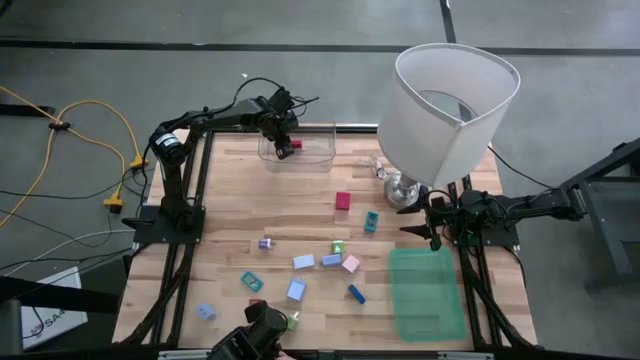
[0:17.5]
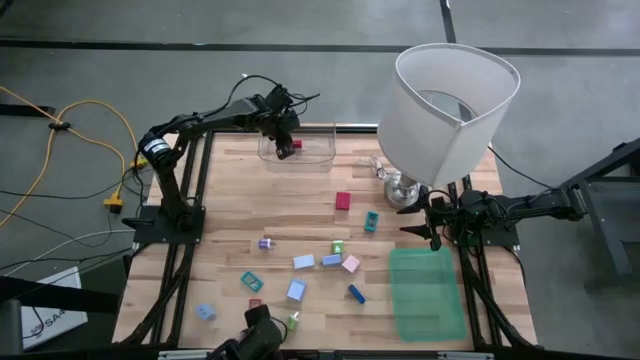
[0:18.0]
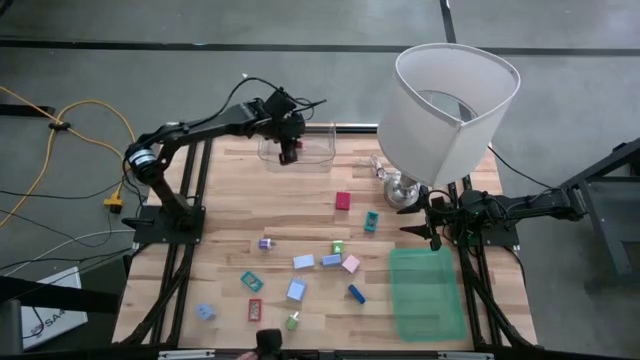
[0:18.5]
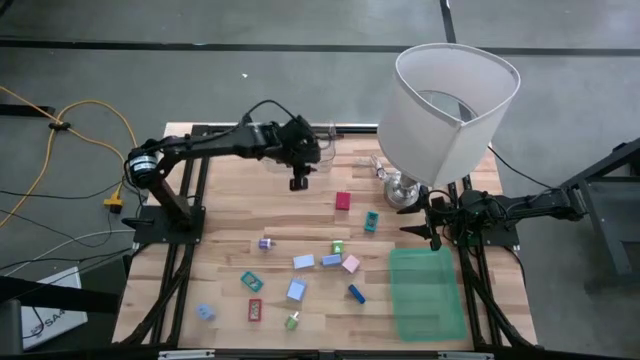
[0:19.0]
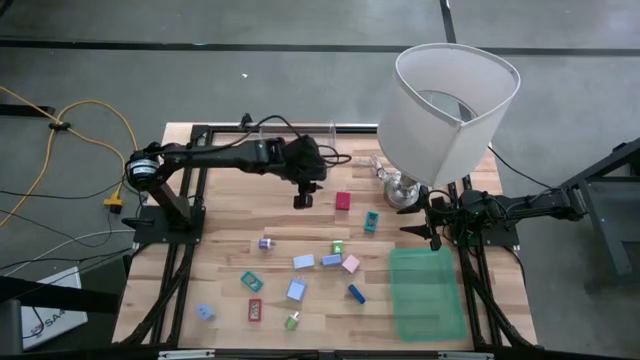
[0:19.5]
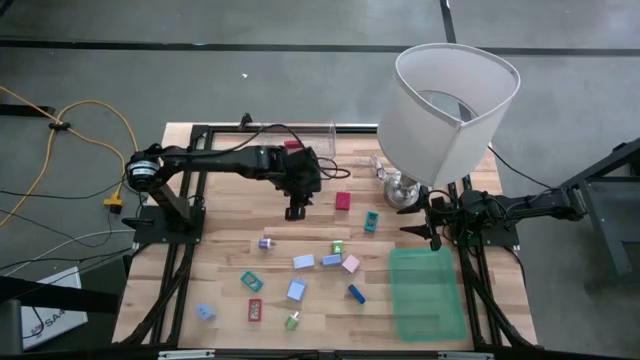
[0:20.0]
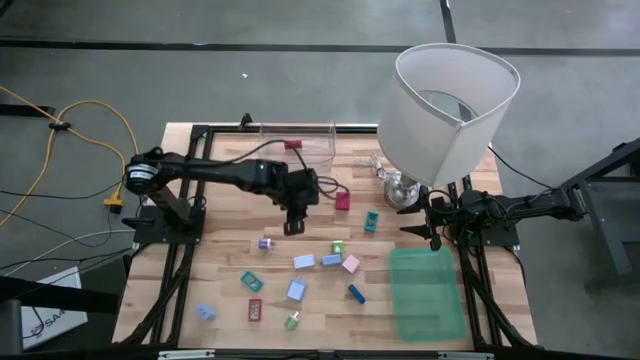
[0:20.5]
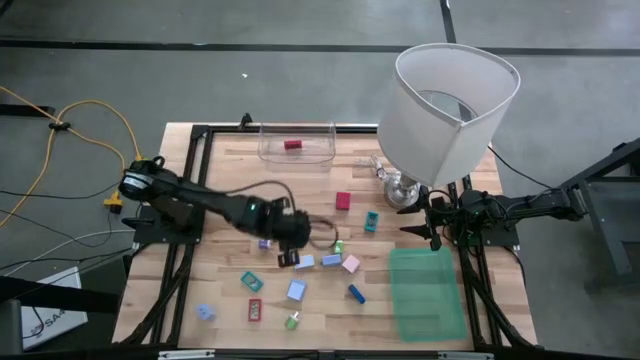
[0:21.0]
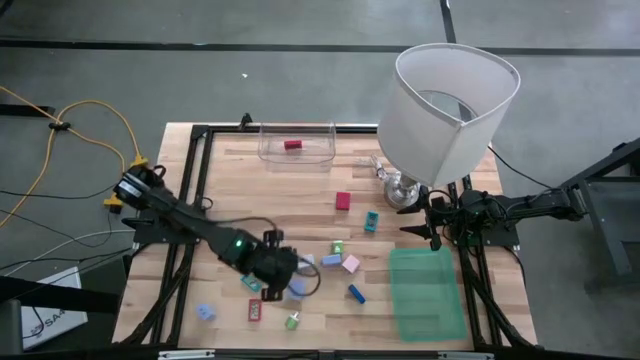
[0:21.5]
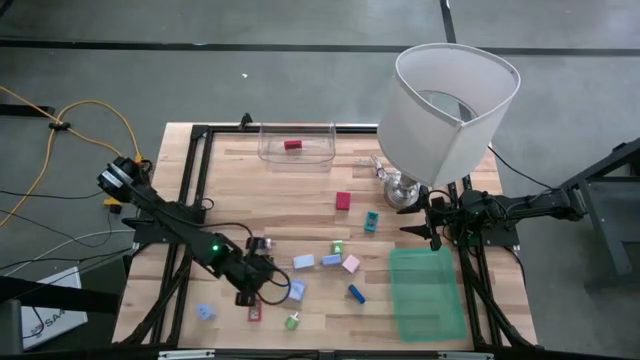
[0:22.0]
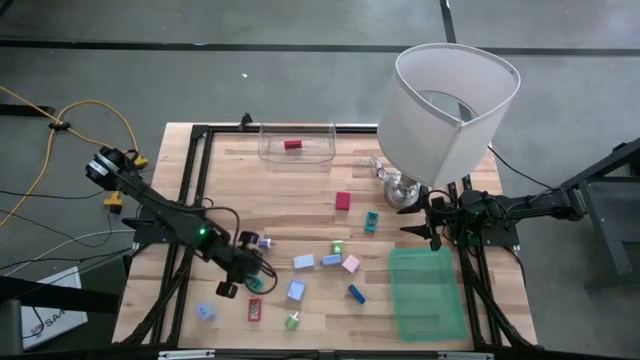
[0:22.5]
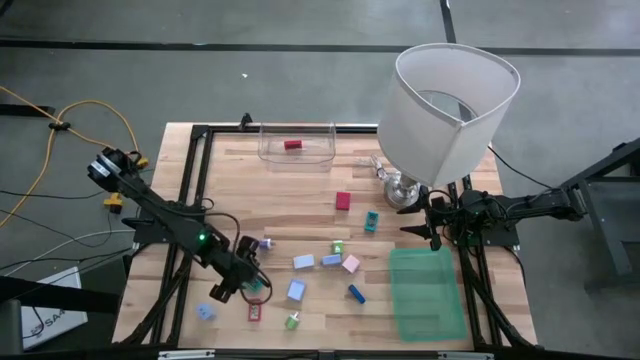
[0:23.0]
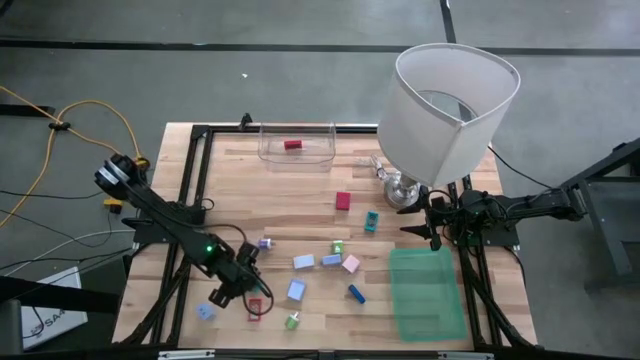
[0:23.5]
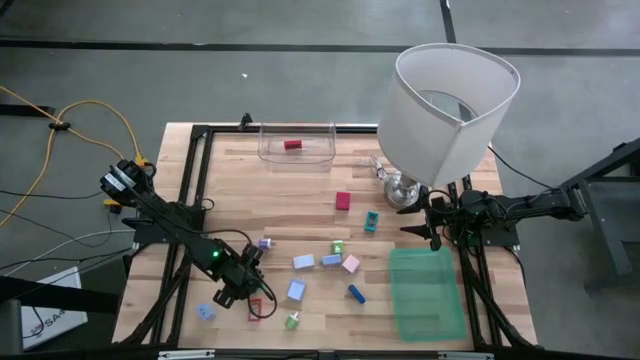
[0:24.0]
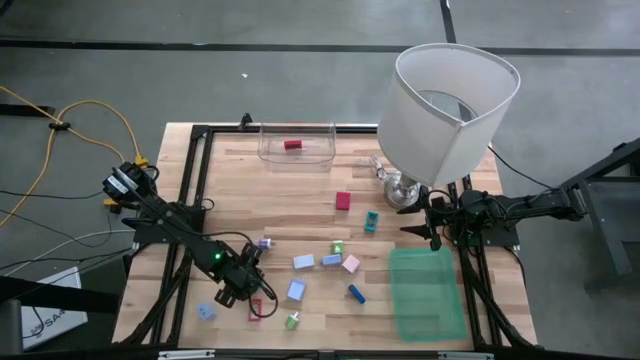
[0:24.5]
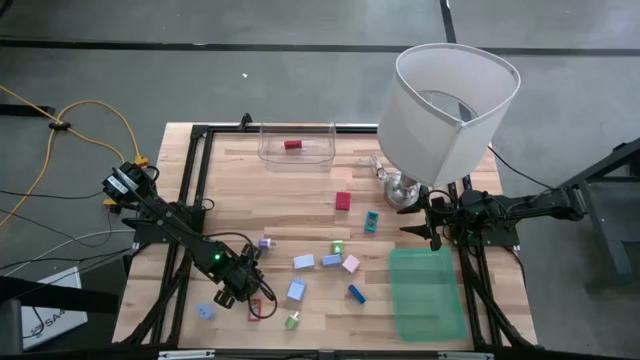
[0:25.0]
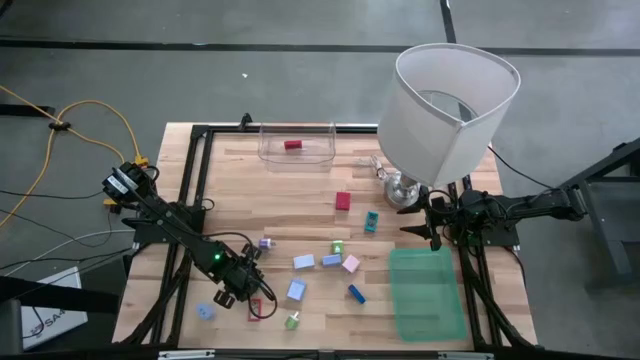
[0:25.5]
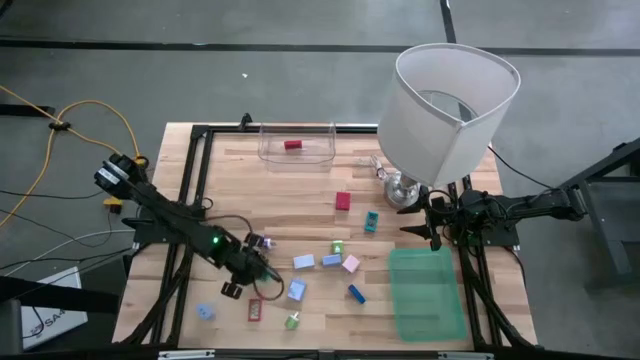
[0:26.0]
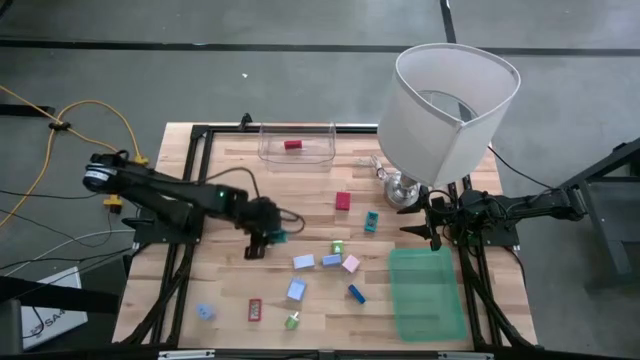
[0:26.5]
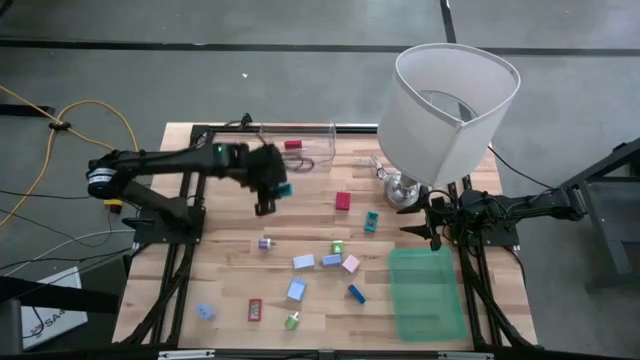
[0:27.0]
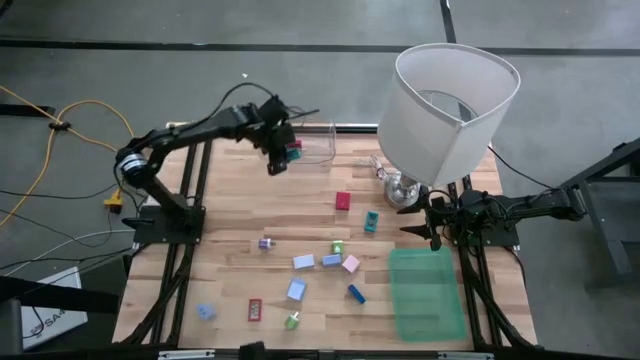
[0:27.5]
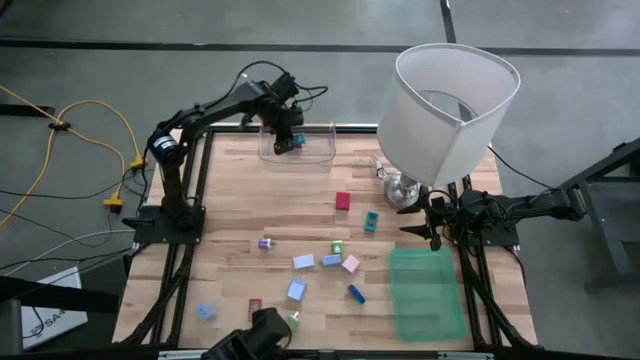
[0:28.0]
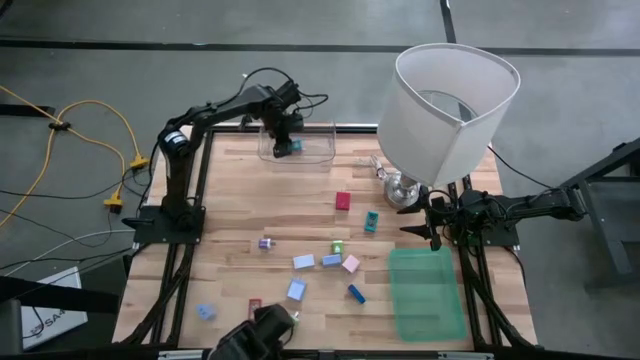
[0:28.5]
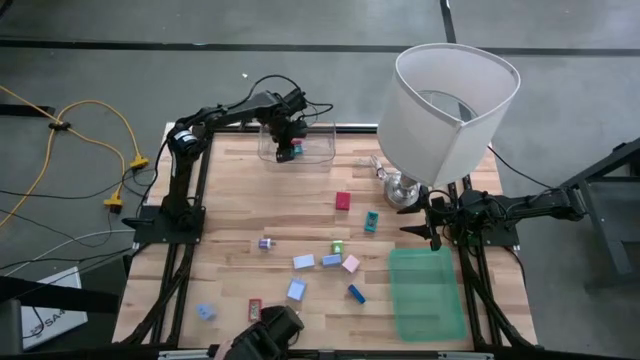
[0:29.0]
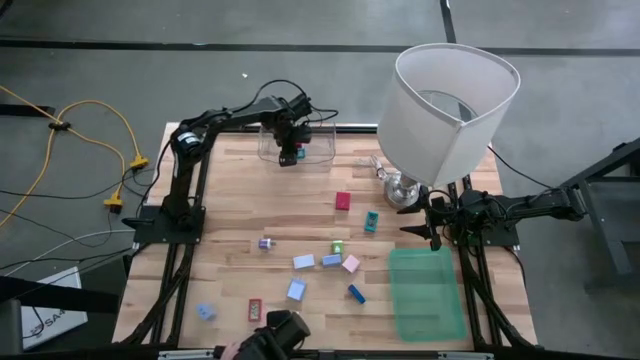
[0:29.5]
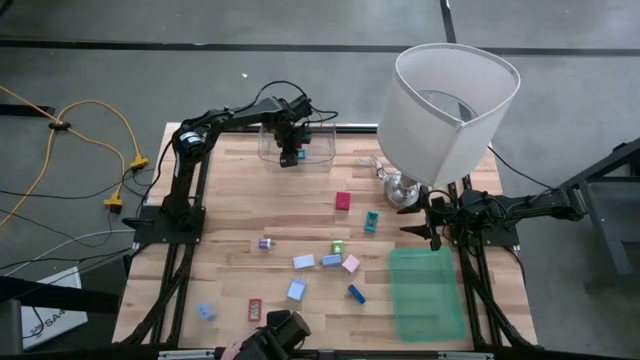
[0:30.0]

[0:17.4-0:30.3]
Task: Pick & Place Office items
Put the left light blue digital clock into the transparent bin

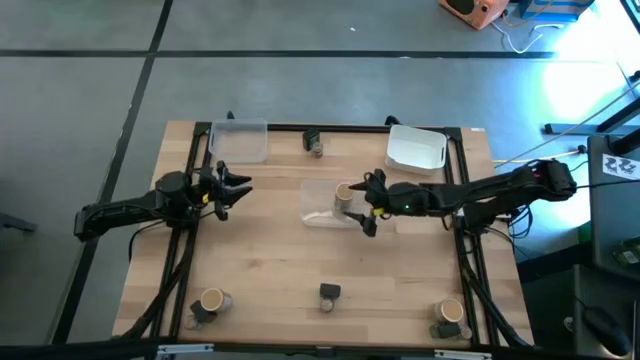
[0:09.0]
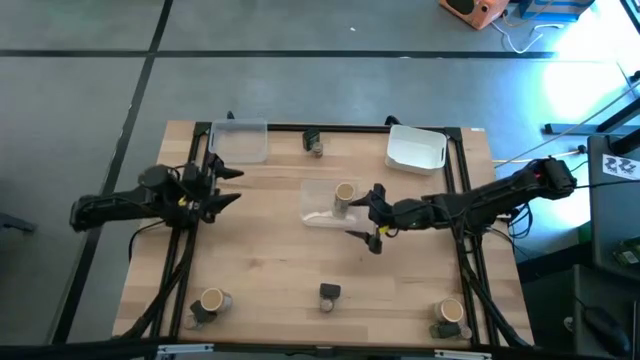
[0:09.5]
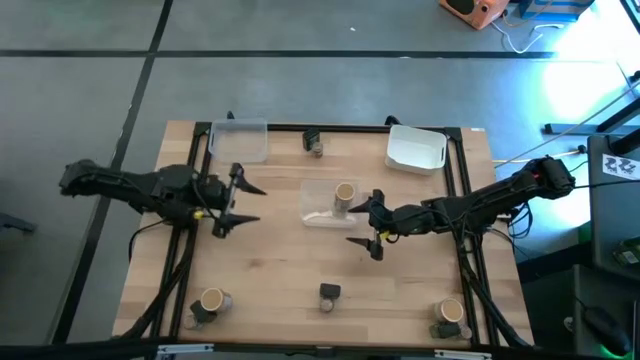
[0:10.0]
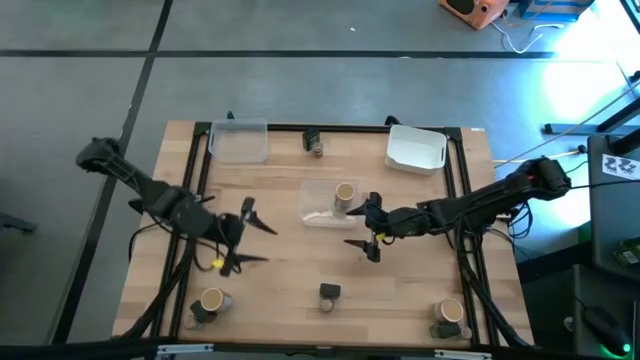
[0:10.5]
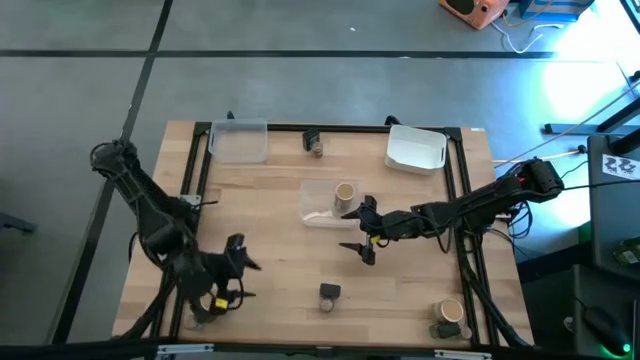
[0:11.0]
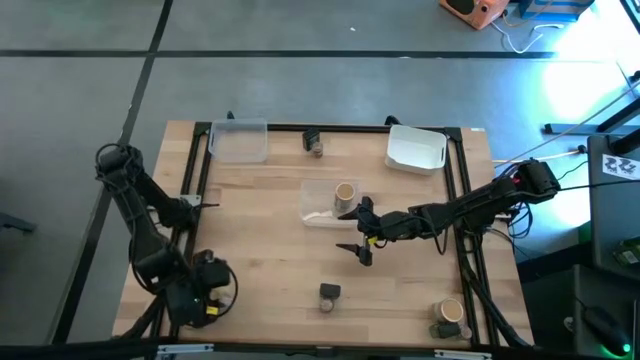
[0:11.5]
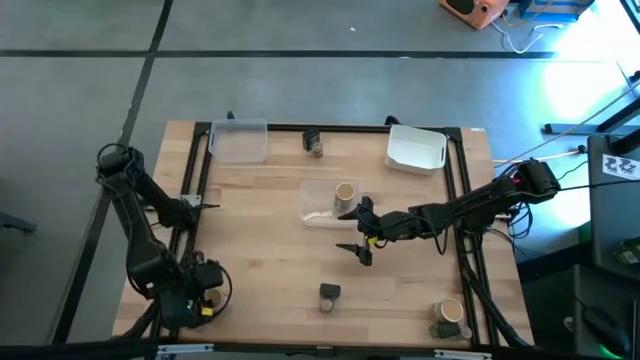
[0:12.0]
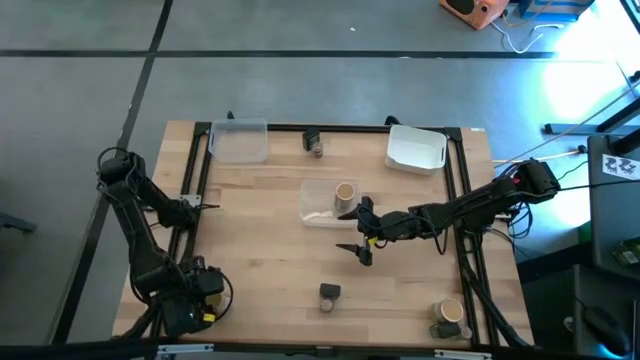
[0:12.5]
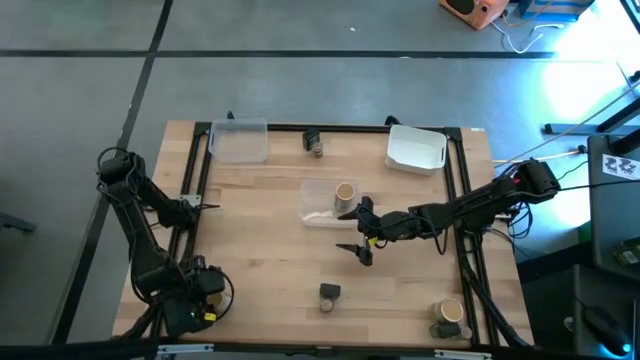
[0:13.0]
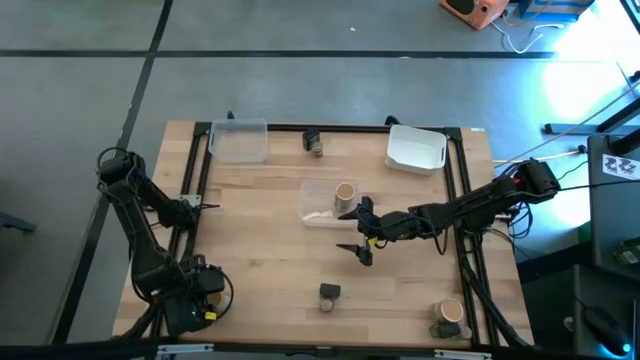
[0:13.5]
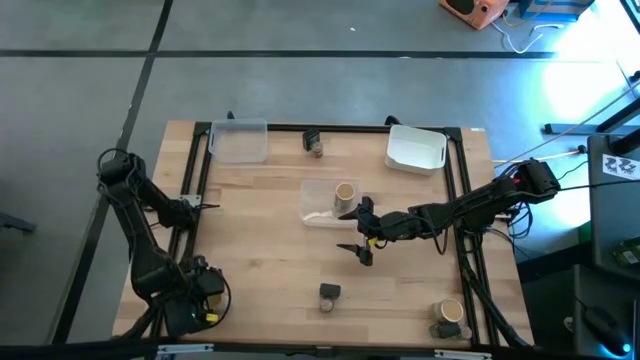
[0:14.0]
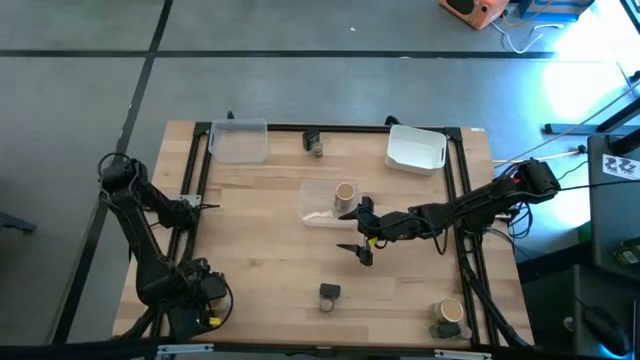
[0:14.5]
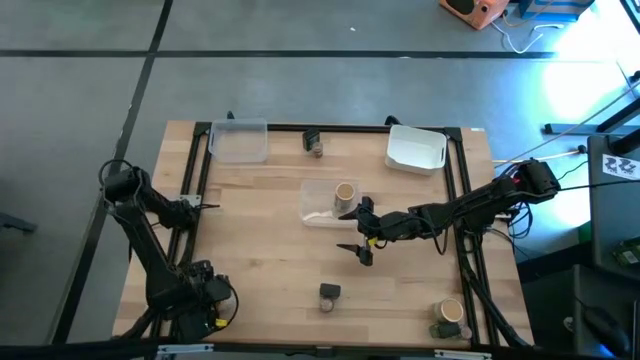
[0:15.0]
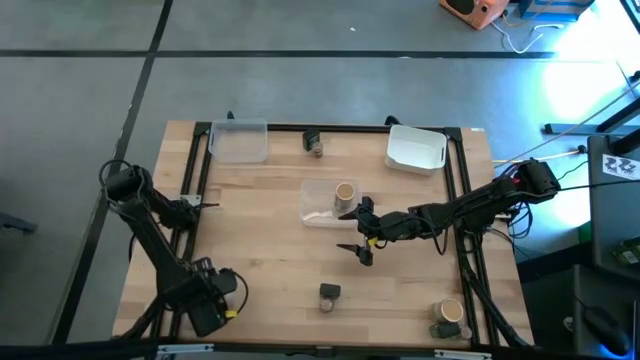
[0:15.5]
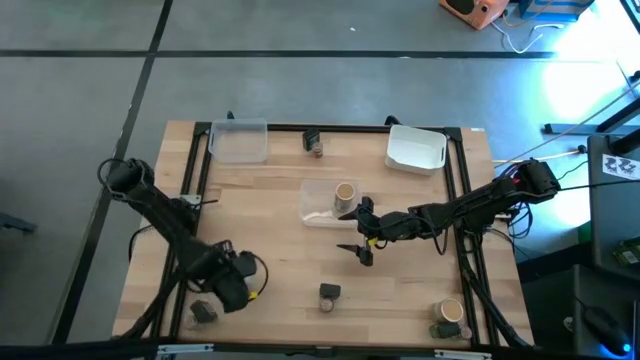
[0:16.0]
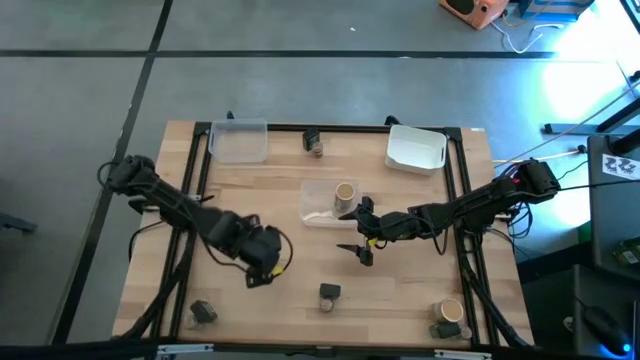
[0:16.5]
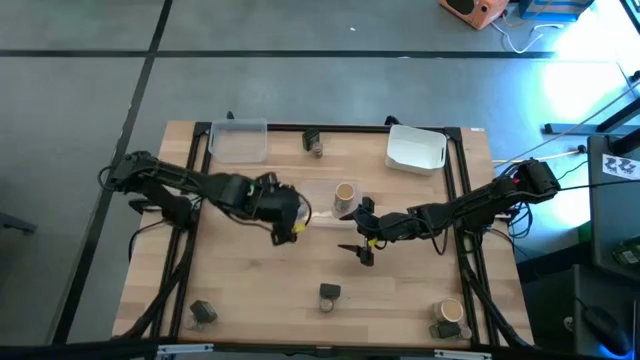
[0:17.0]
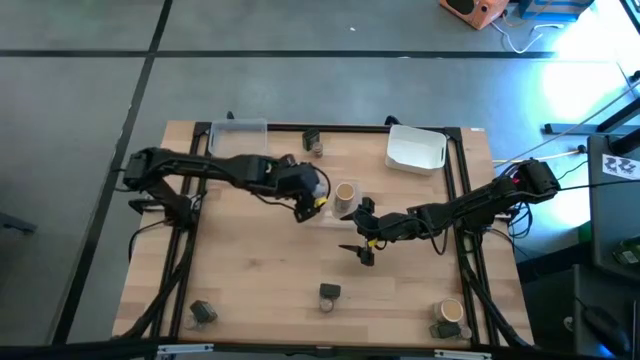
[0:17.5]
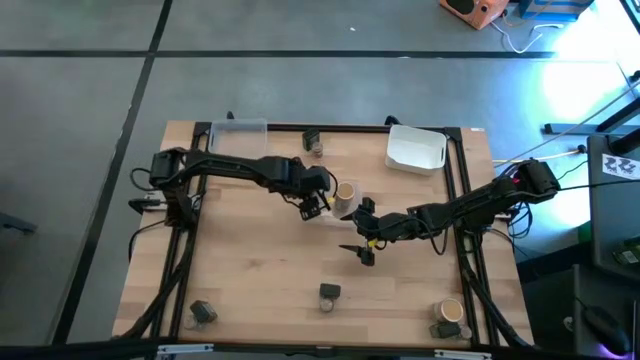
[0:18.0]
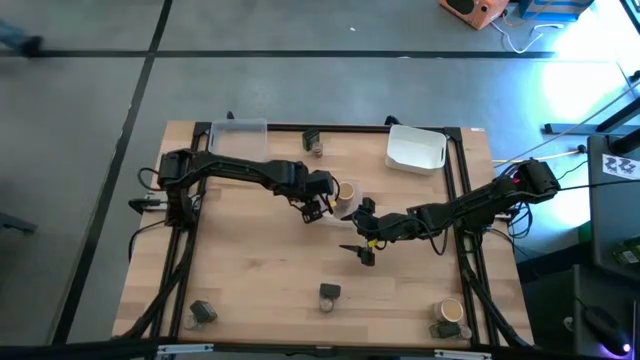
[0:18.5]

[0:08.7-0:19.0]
Task: Sort spices by type
Put the gold seasoning bottle into the bottom transparent bin
